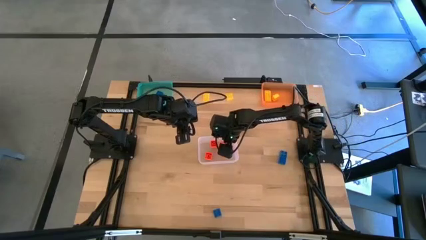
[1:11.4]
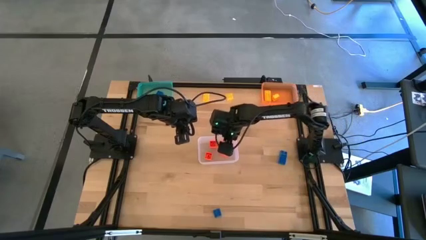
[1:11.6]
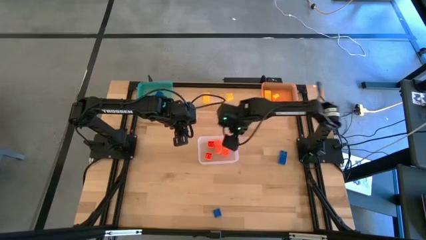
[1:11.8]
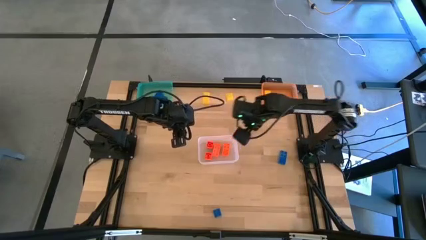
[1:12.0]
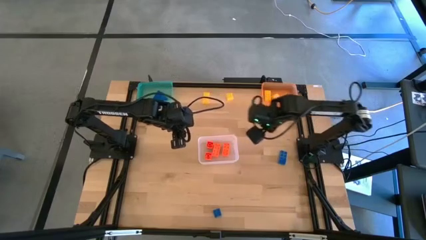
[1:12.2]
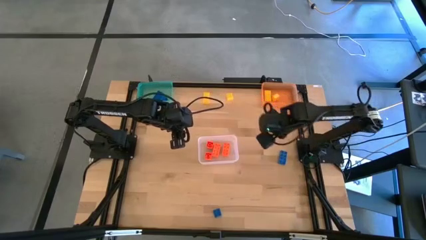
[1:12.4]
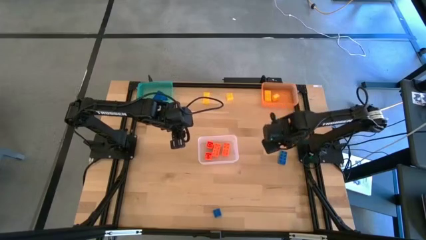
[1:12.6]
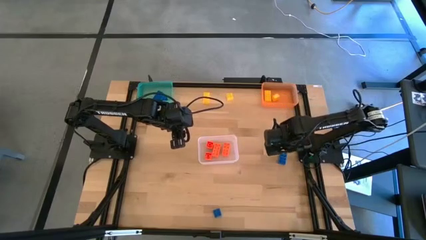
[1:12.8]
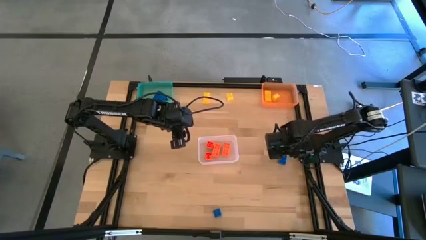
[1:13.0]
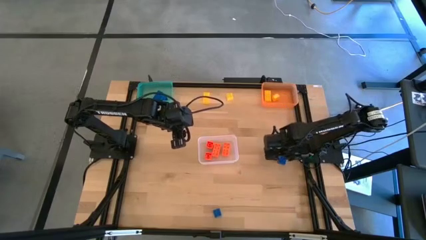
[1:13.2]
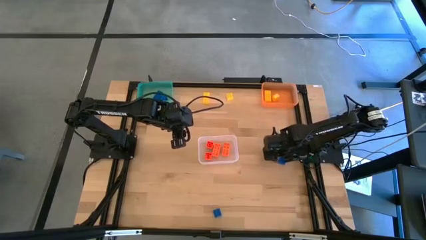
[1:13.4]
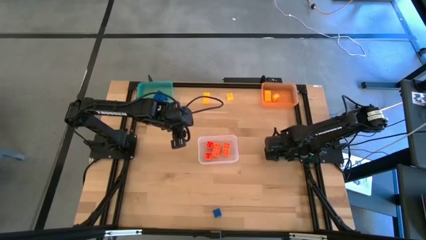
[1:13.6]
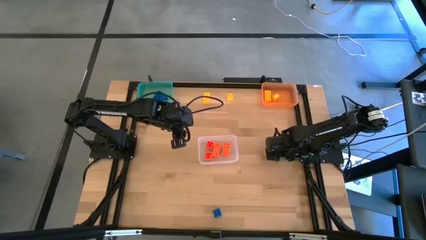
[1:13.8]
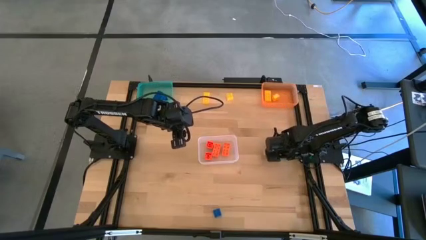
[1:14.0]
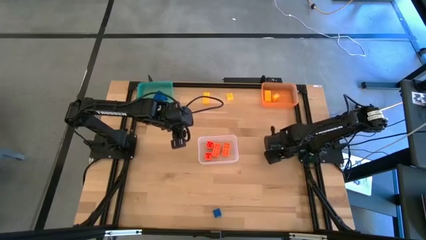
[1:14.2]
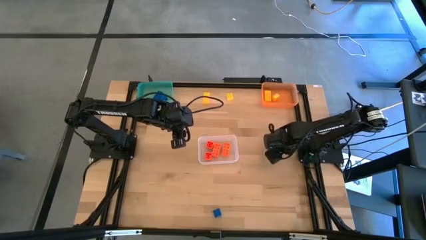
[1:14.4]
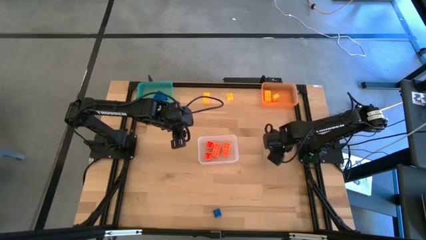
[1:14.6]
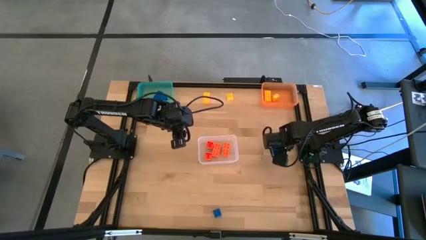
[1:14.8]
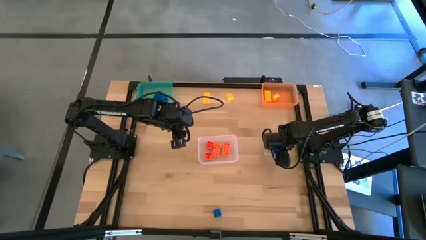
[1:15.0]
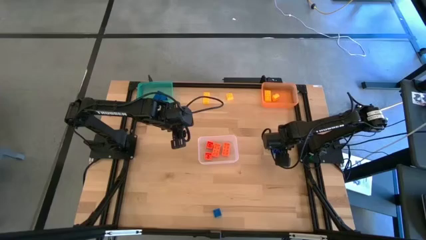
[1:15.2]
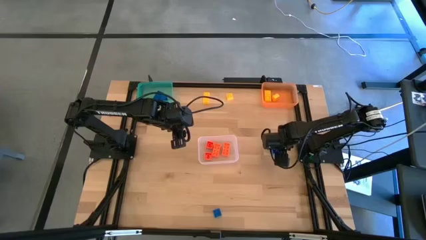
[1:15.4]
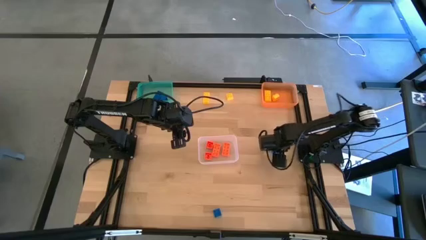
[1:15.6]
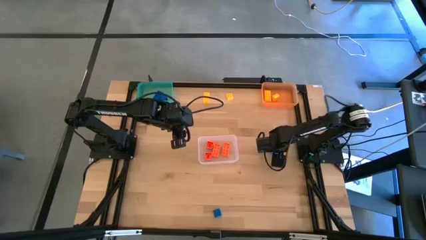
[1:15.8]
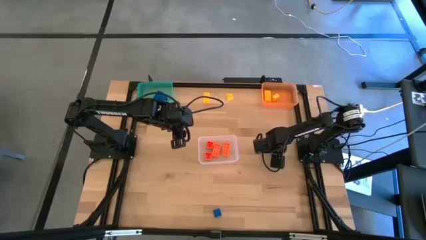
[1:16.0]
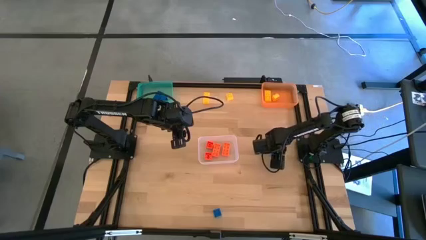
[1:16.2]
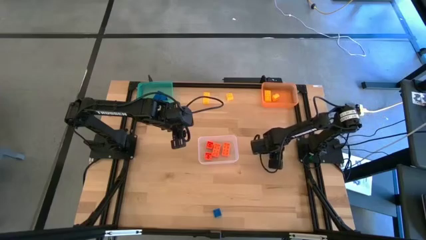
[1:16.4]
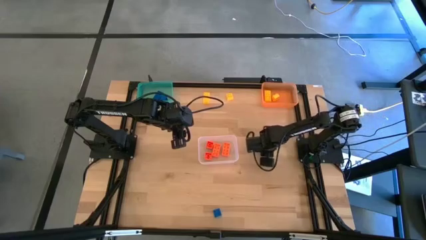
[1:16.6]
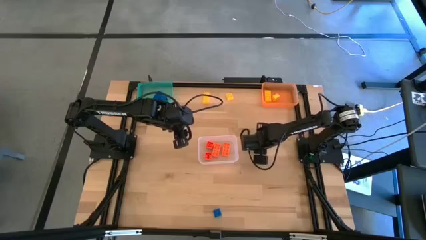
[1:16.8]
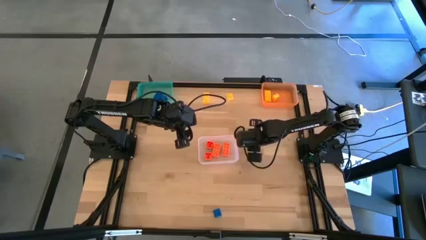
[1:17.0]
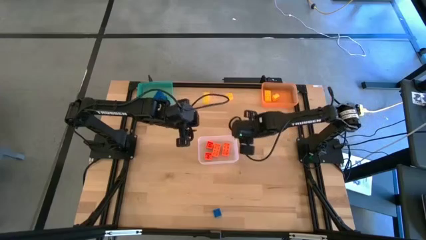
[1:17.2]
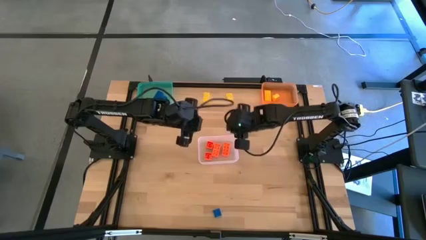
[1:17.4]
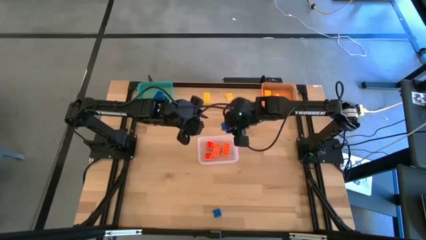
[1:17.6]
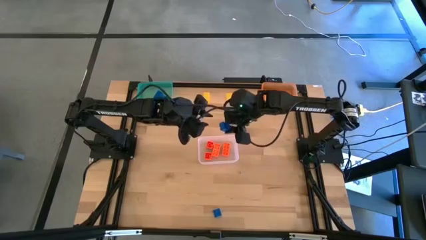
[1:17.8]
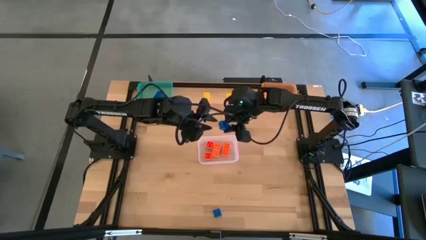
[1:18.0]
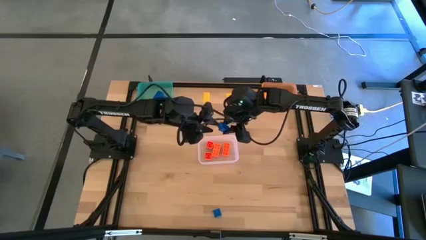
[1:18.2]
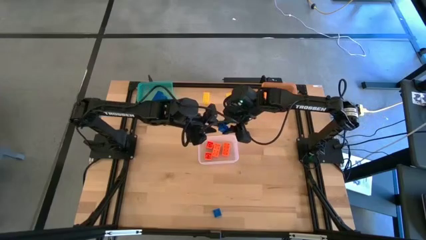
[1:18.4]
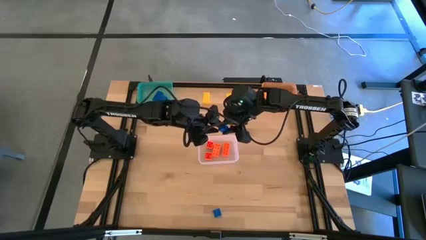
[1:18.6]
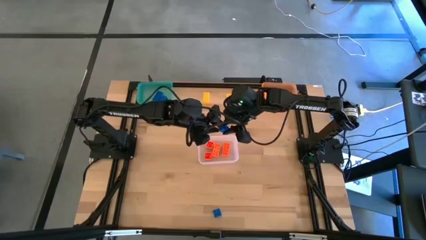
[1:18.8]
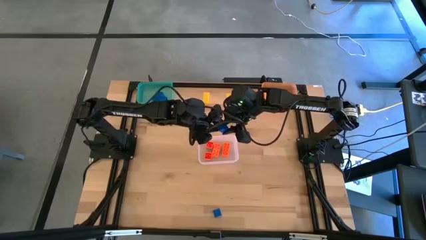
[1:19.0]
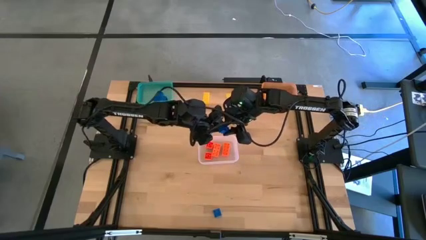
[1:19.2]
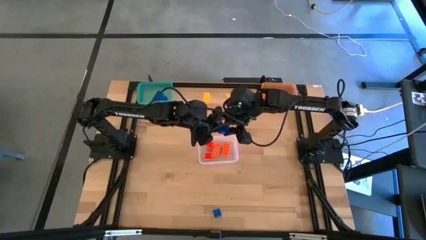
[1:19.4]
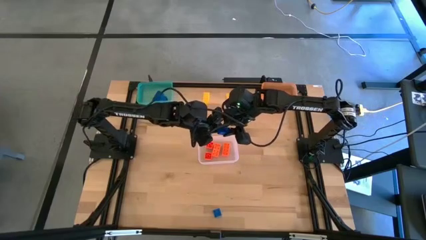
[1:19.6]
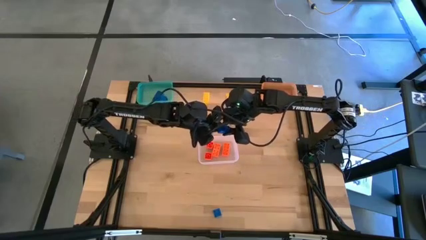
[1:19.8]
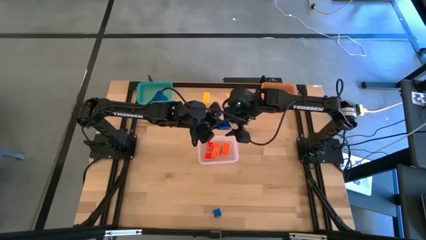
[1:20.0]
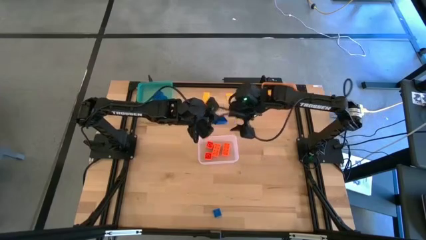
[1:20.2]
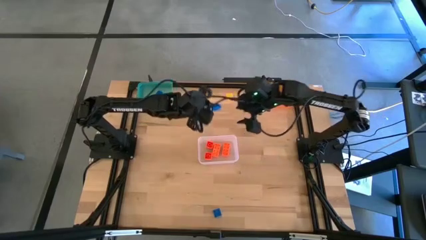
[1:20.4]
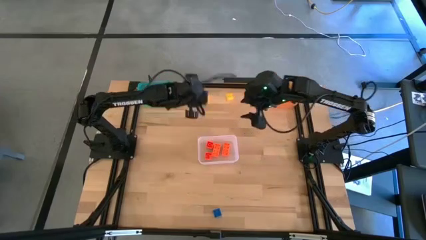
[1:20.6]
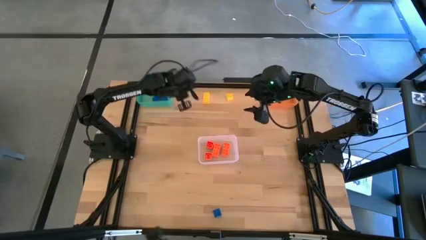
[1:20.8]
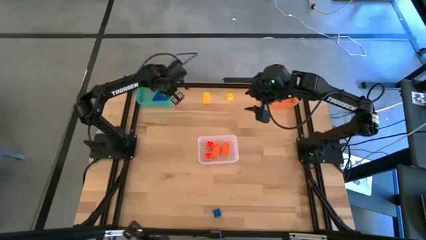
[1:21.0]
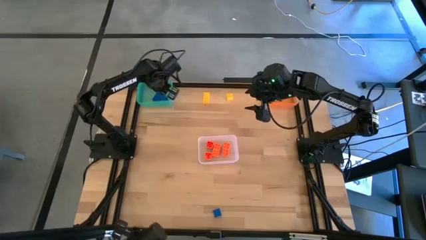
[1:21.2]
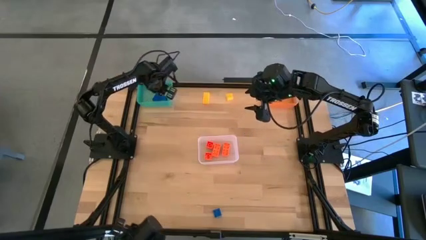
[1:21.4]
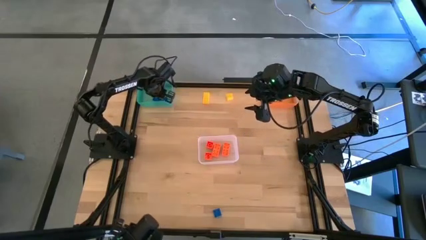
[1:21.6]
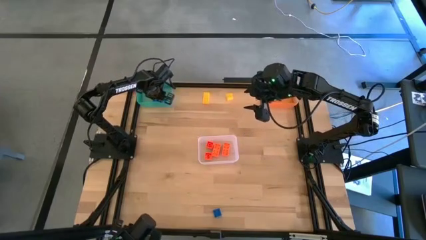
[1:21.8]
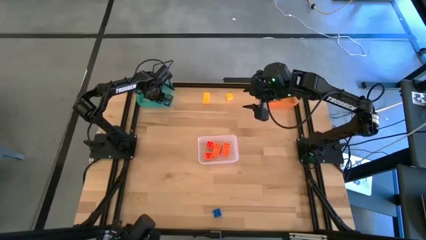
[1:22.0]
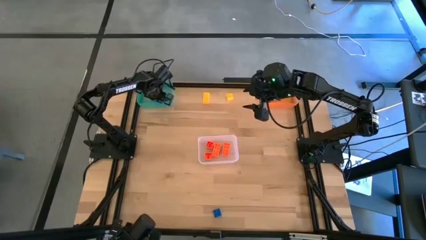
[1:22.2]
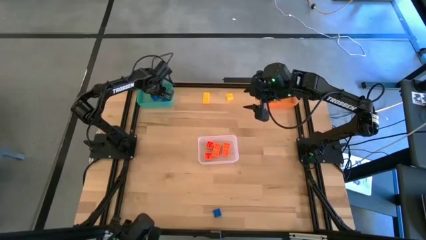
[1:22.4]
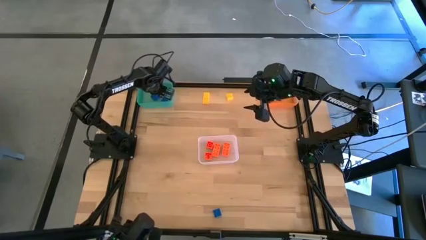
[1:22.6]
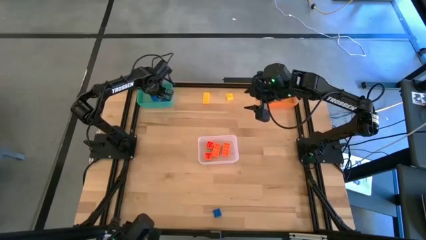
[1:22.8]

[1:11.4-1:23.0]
Task: Sort & place blocks by color
Put the top blue game piece into the blue bin
